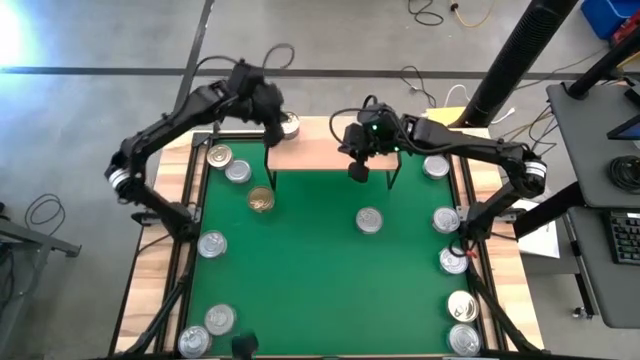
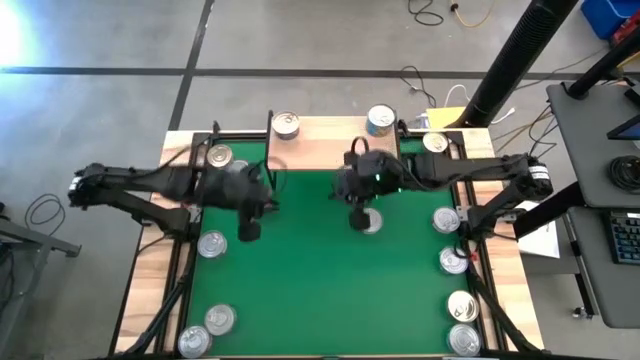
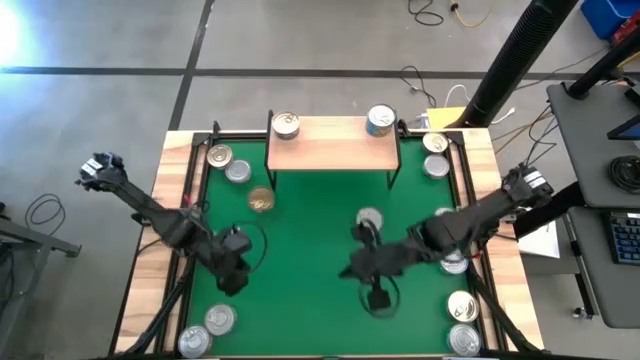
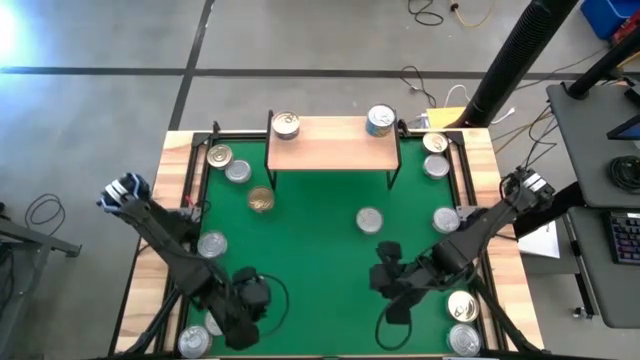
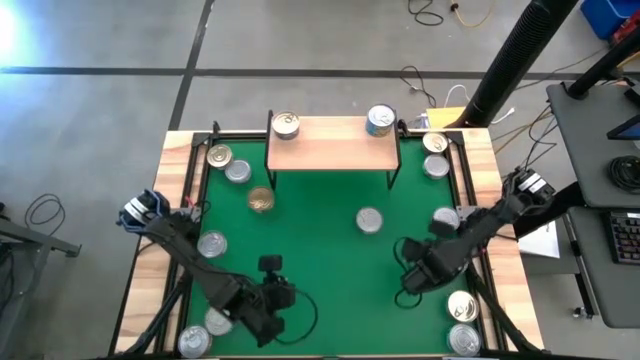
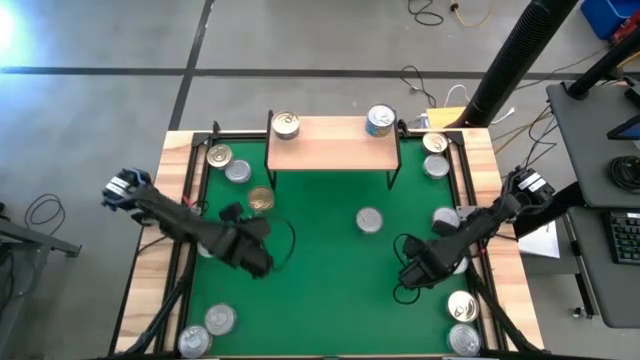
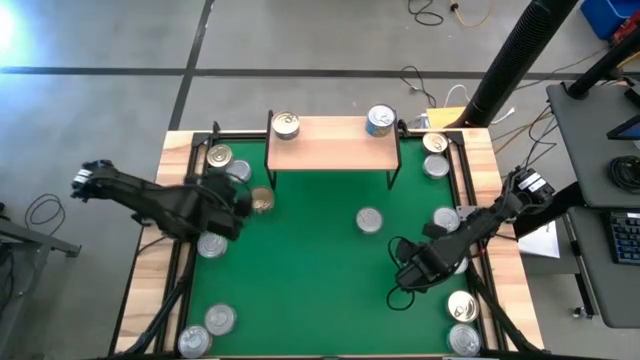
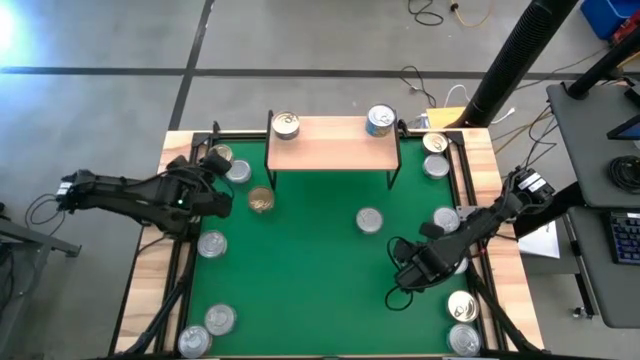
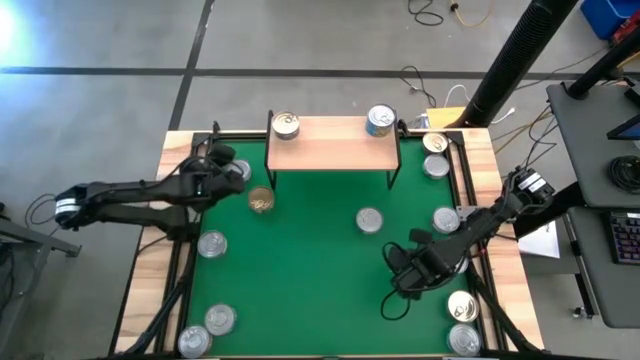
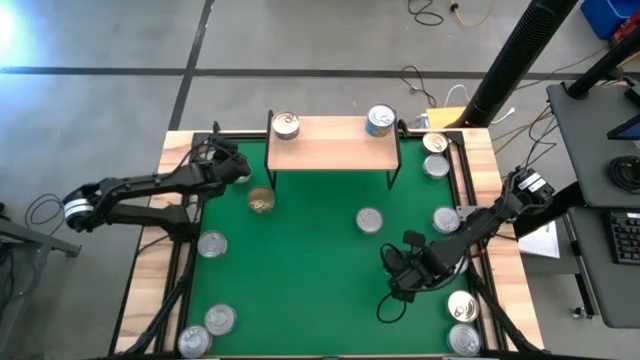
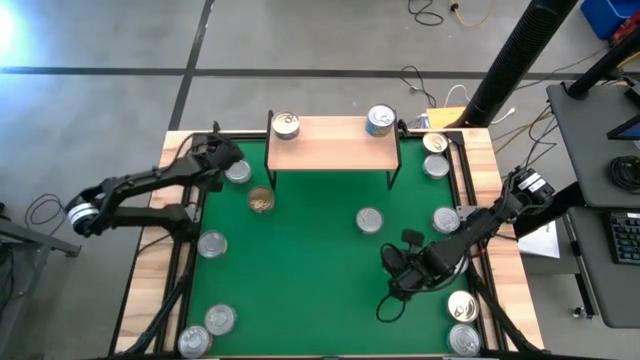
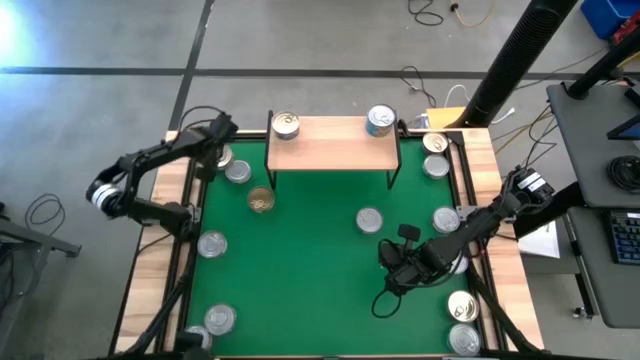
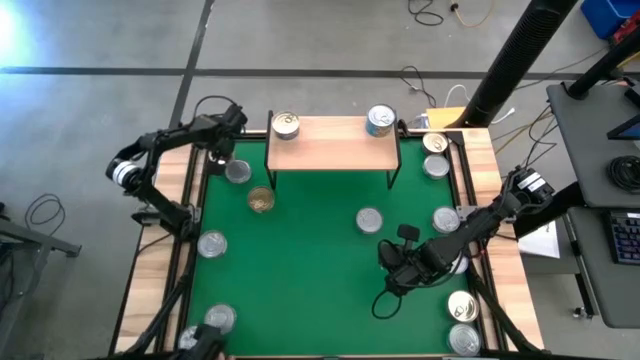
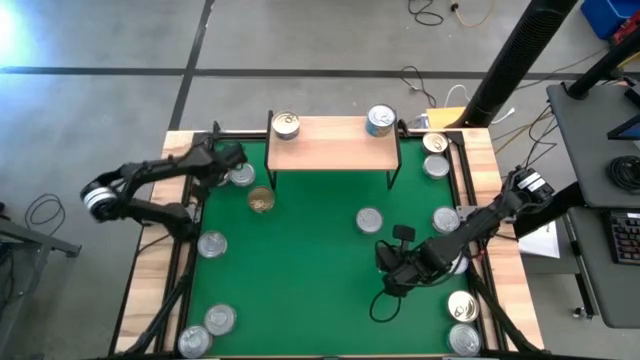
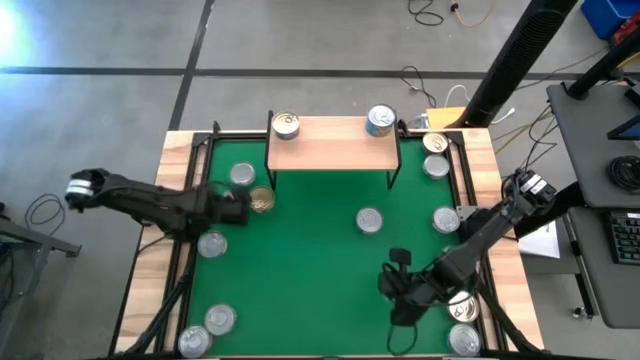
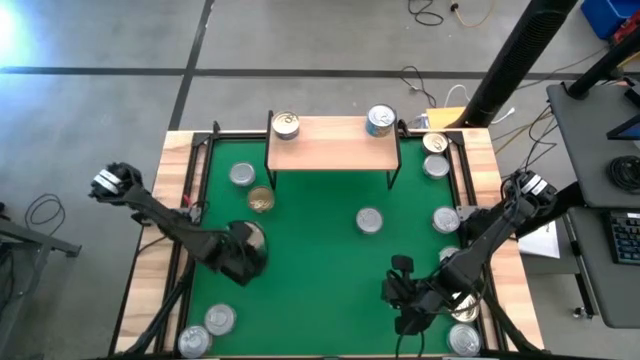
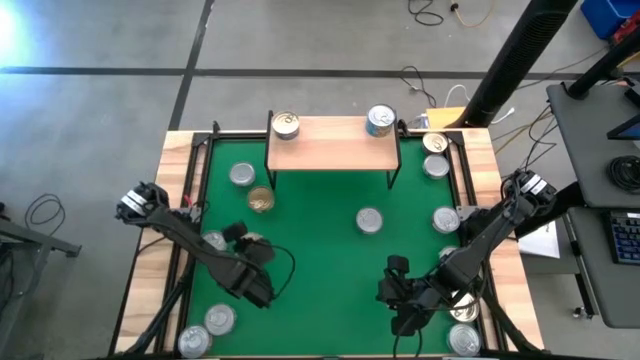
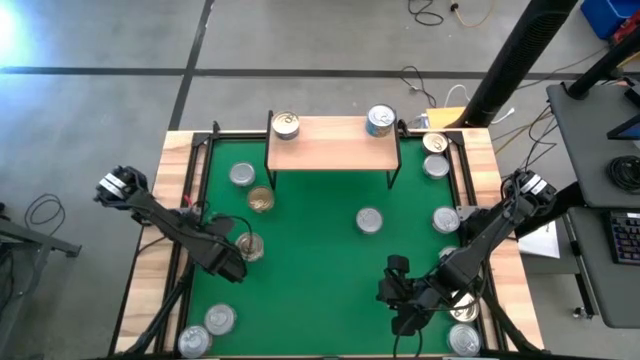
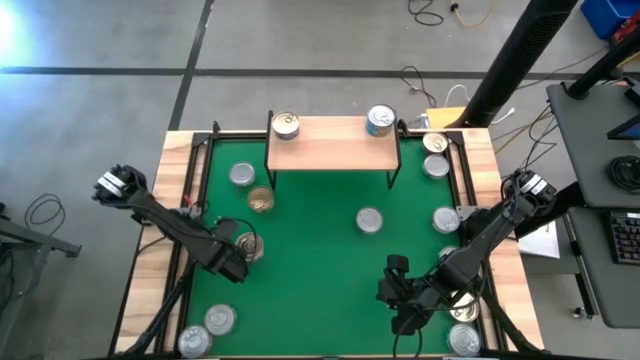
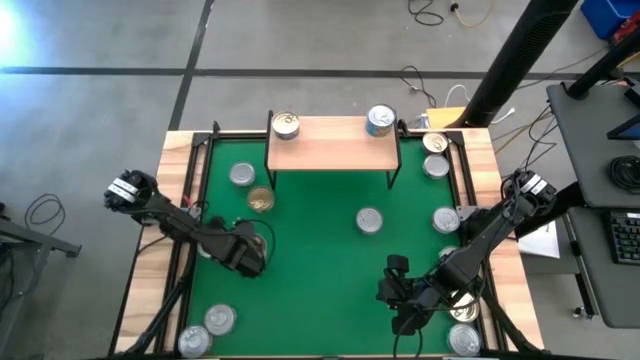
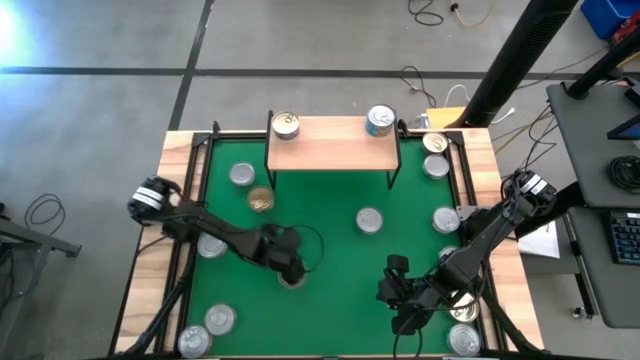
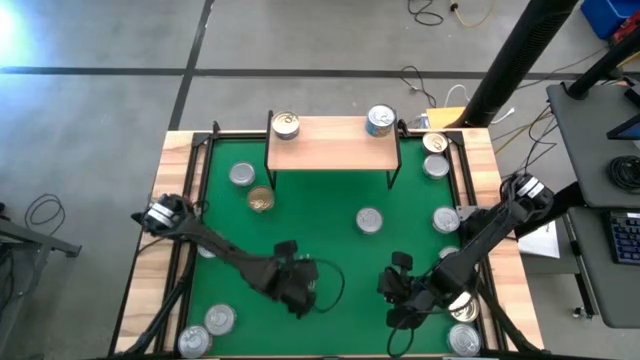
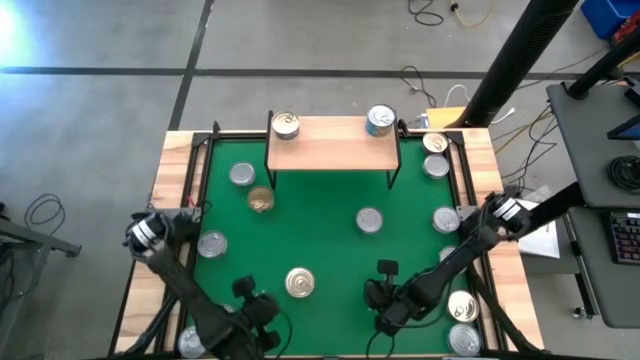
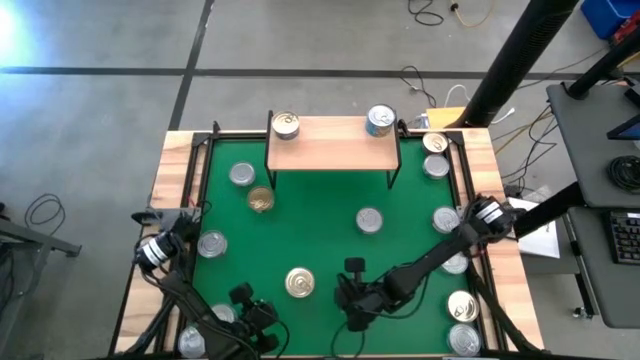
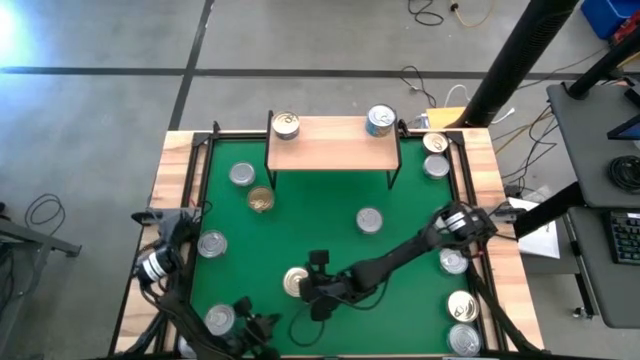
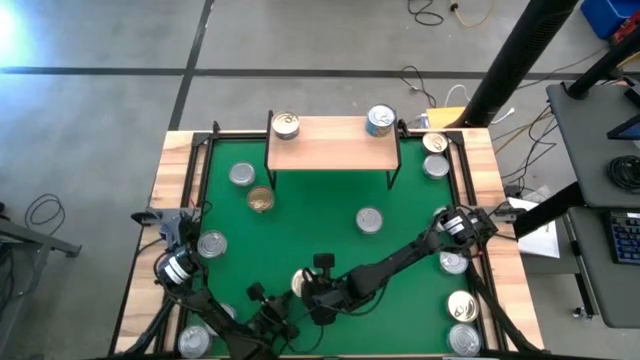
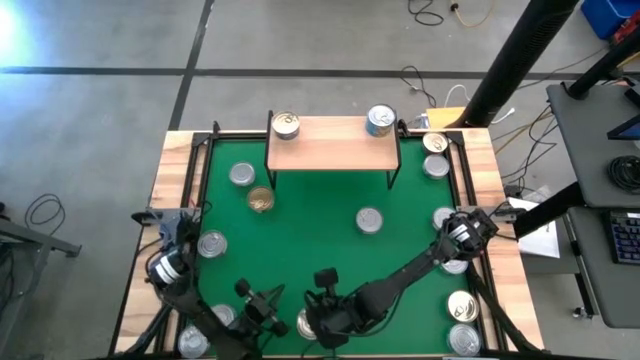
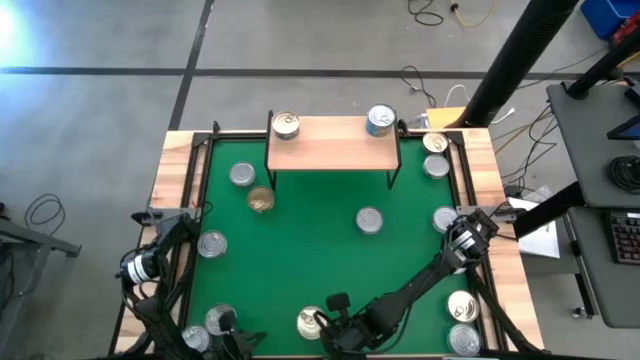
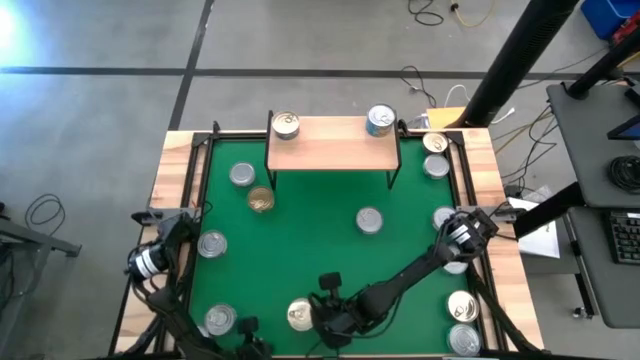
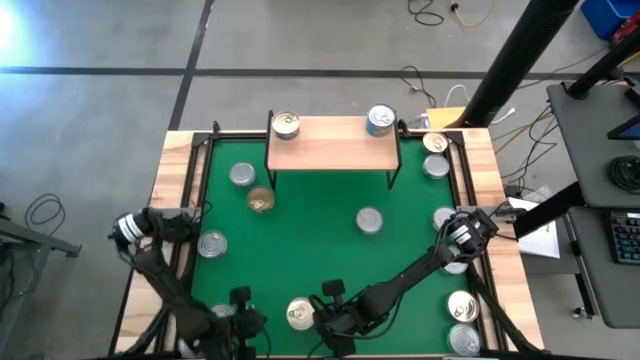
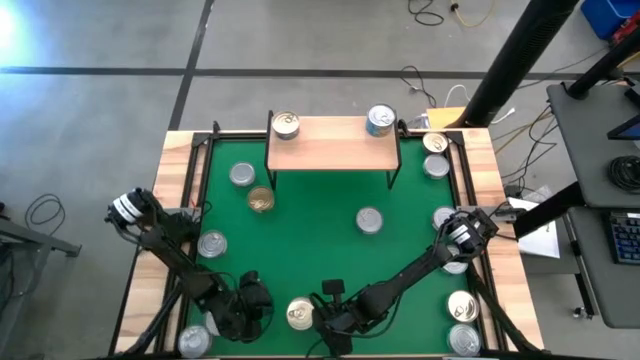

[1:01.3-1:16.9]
Task: Stack canned seafood by type on shelf
Stack the blue pink tuna can on top of the blue pink tuna can on the shelf

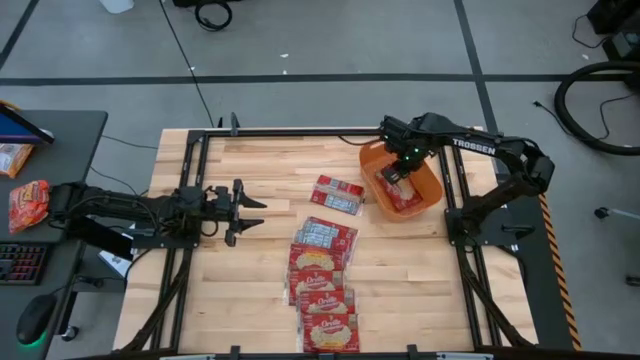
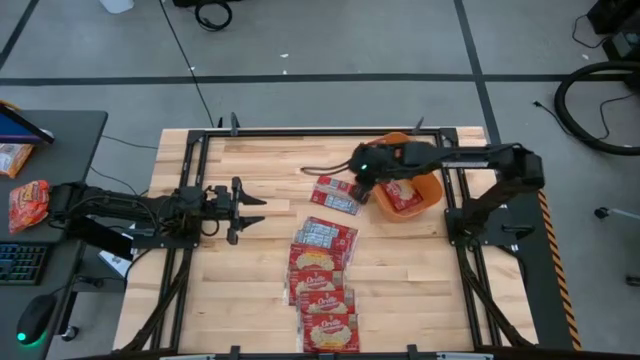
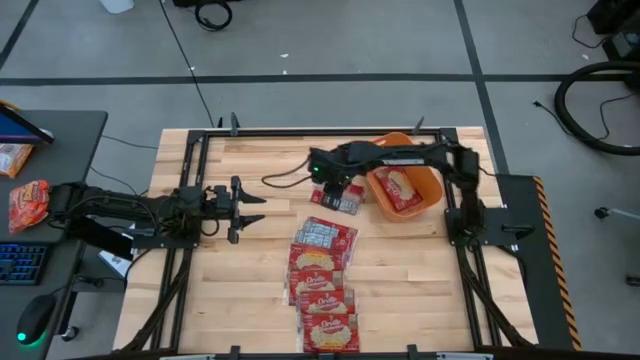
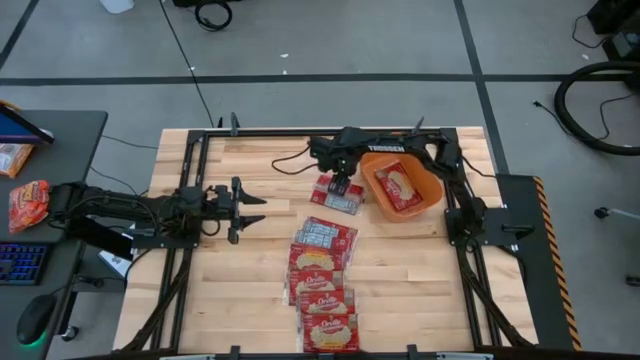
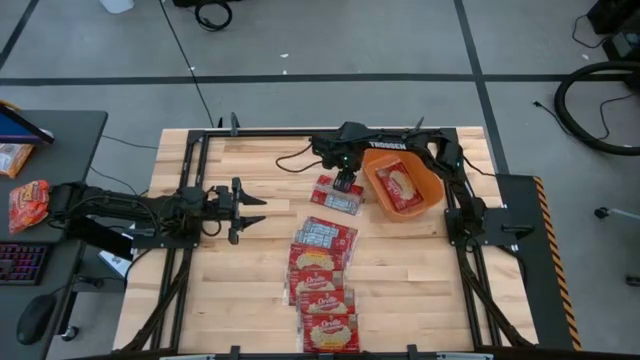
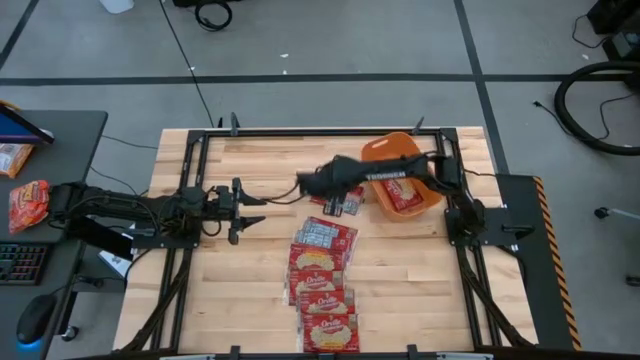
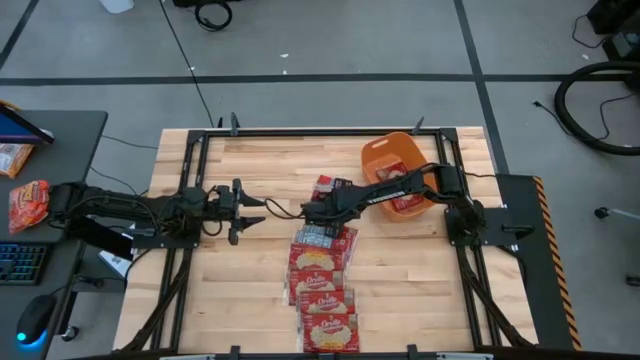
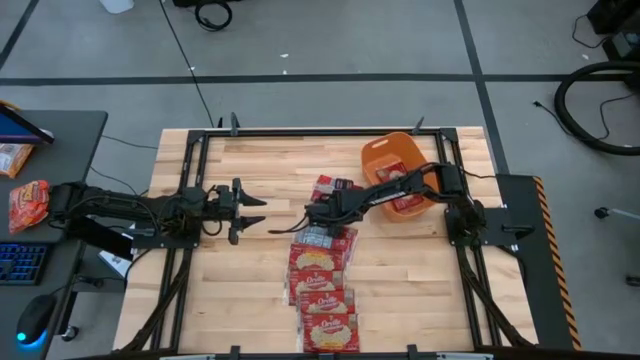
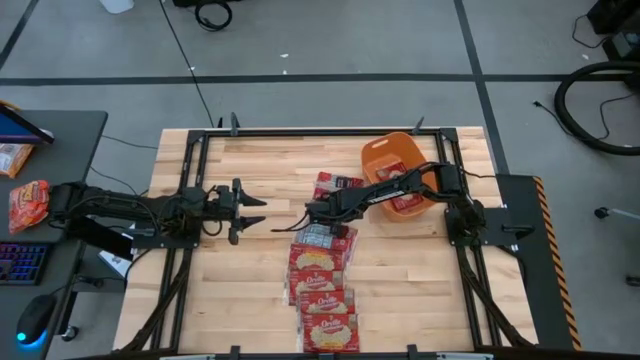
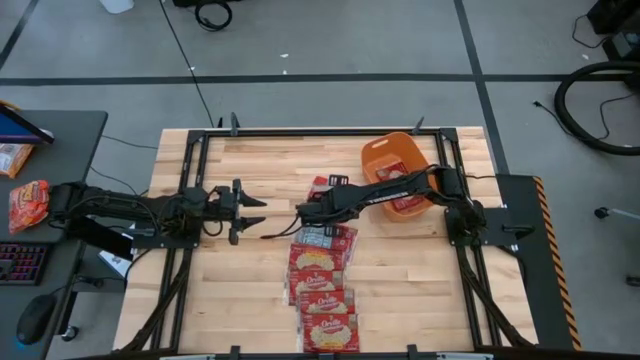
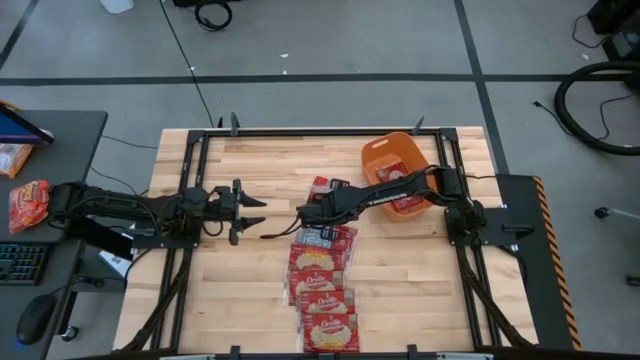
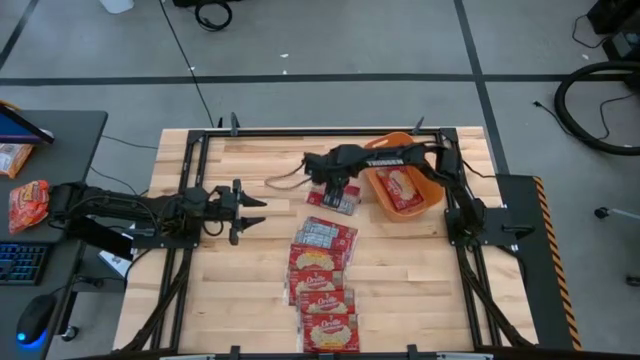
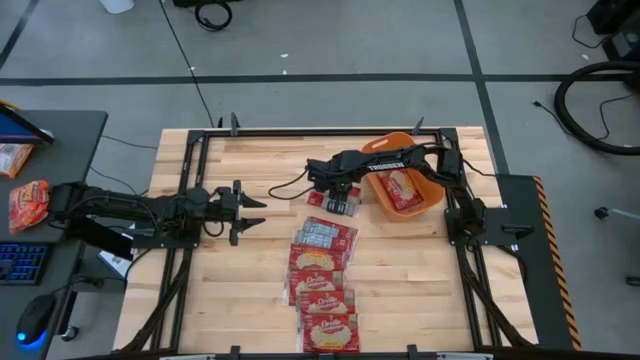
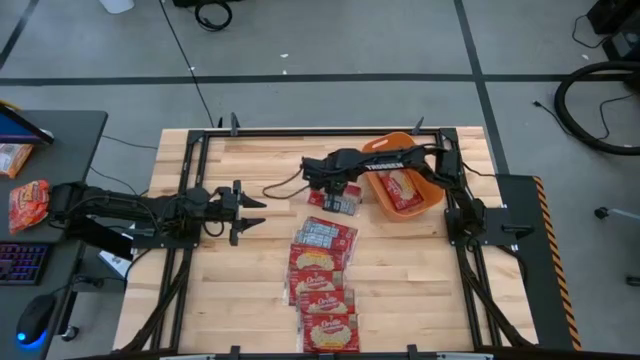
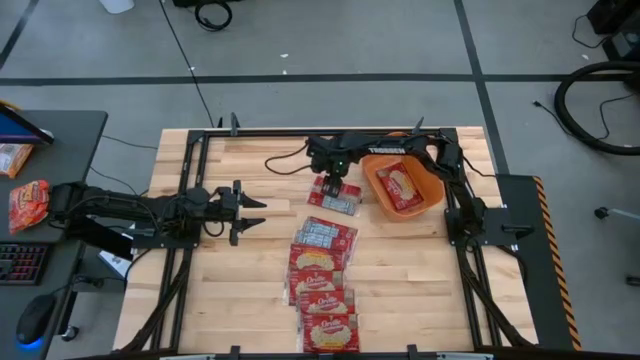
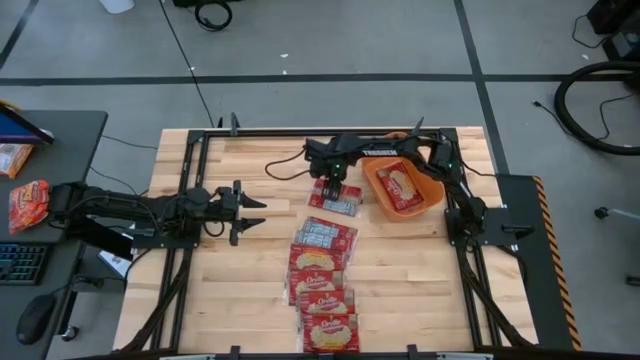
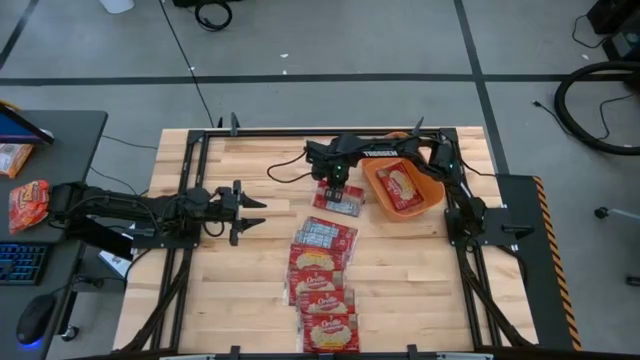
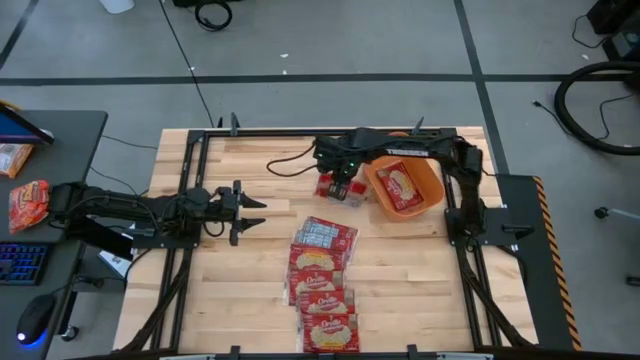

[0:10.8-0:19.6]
Task: Sort popcorn bags into baskets
Put the red popcorn bag into the orange bin
